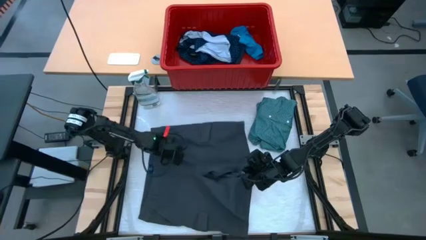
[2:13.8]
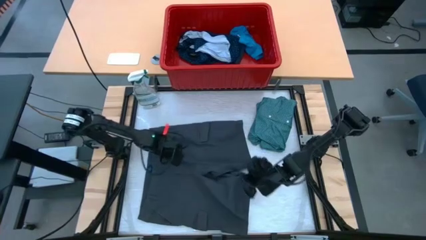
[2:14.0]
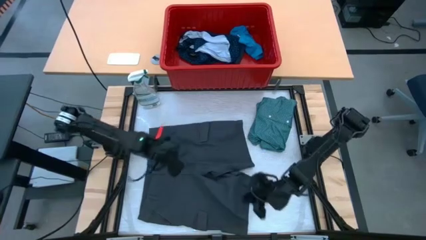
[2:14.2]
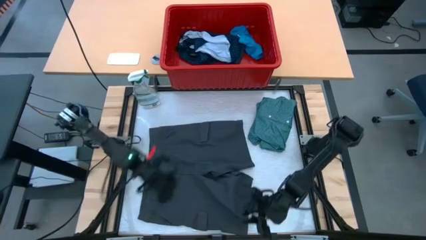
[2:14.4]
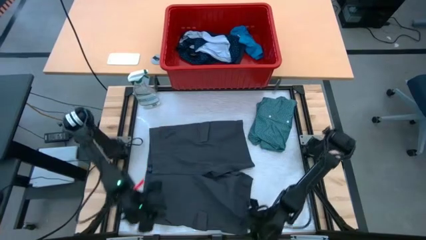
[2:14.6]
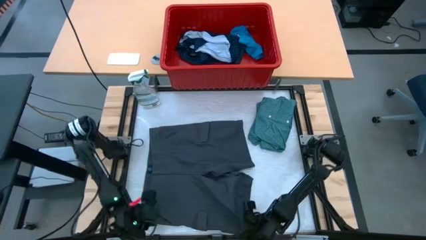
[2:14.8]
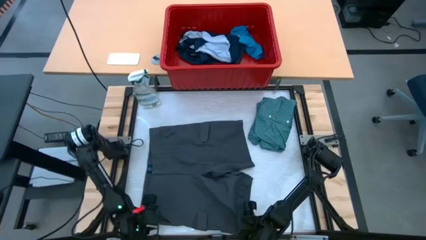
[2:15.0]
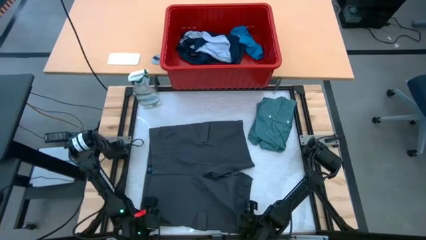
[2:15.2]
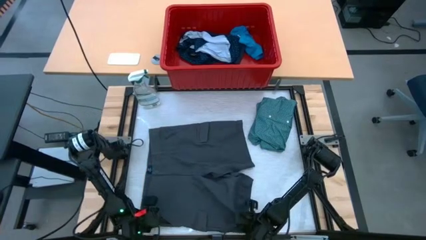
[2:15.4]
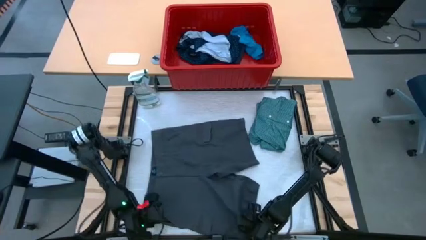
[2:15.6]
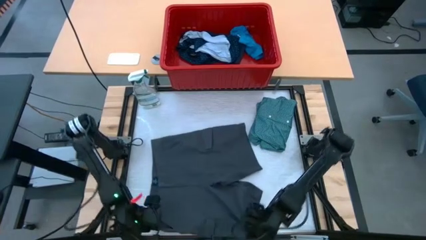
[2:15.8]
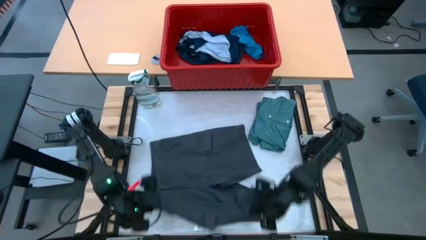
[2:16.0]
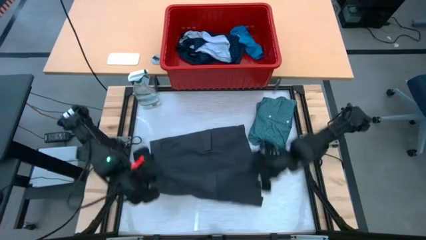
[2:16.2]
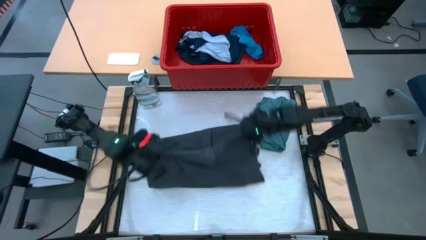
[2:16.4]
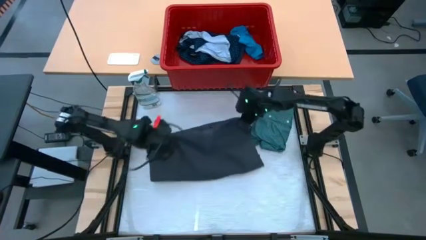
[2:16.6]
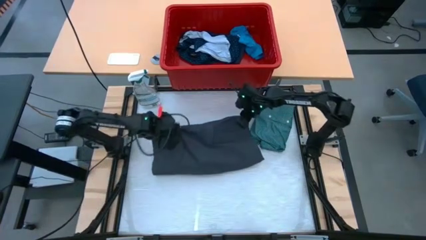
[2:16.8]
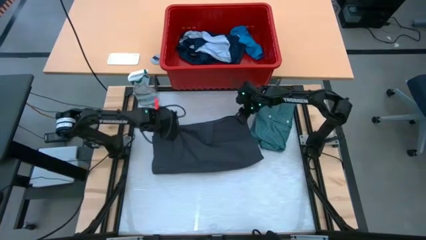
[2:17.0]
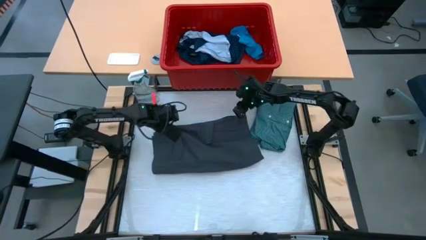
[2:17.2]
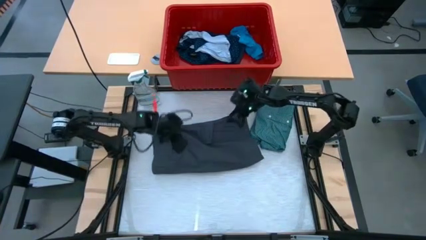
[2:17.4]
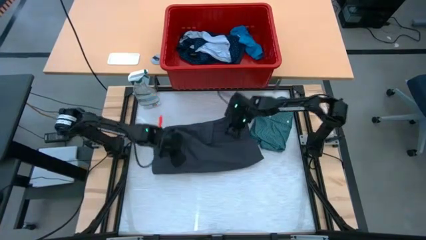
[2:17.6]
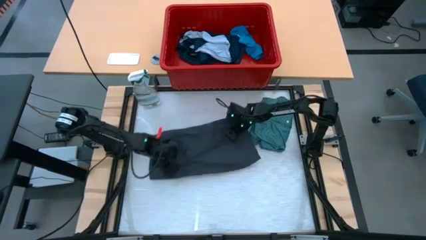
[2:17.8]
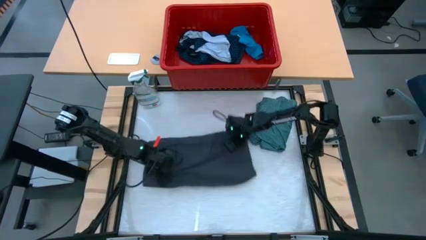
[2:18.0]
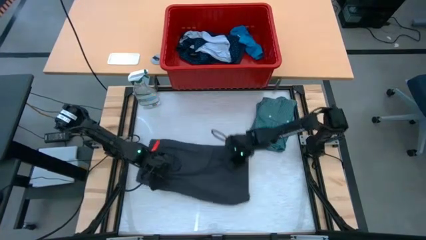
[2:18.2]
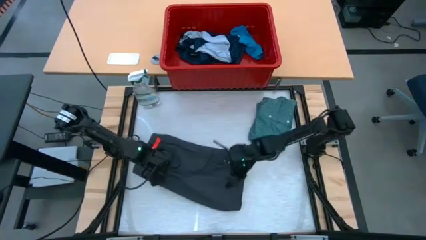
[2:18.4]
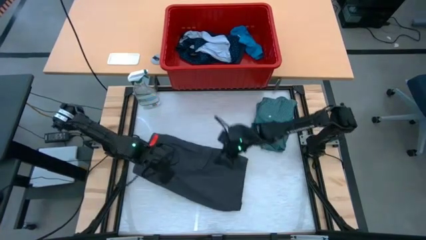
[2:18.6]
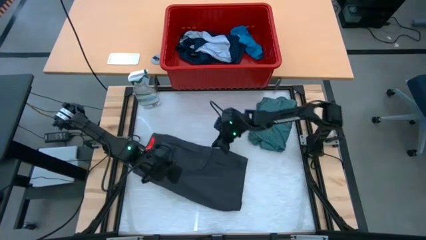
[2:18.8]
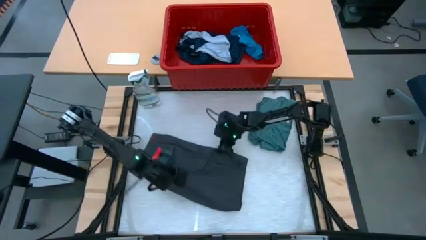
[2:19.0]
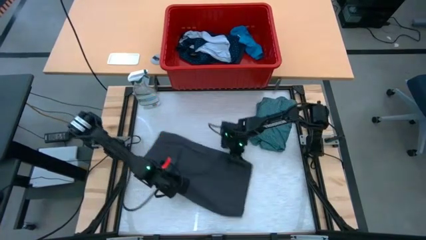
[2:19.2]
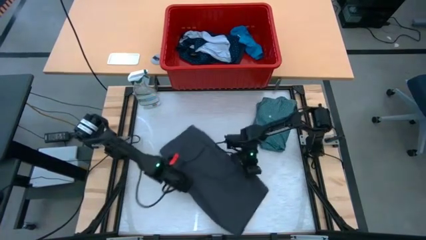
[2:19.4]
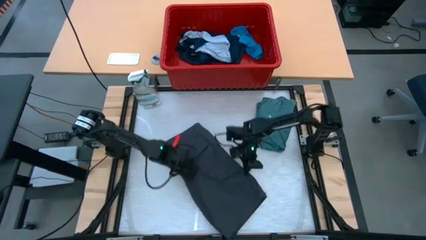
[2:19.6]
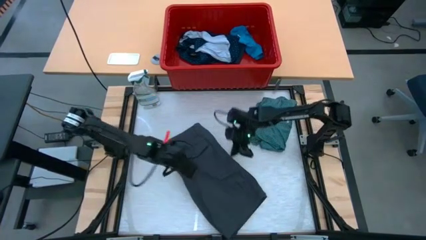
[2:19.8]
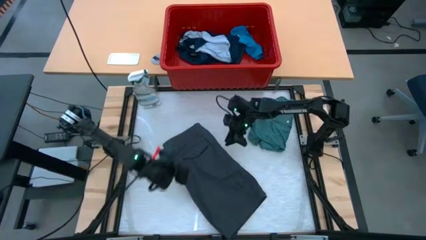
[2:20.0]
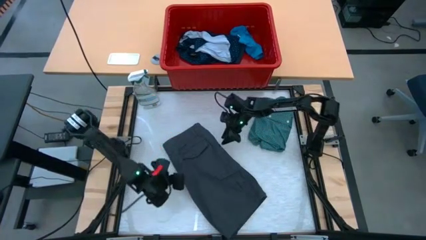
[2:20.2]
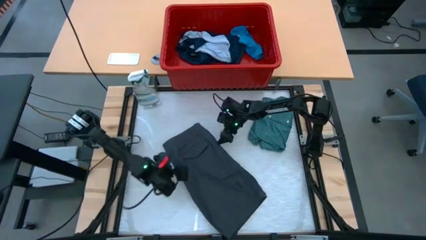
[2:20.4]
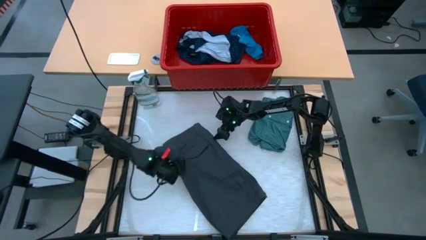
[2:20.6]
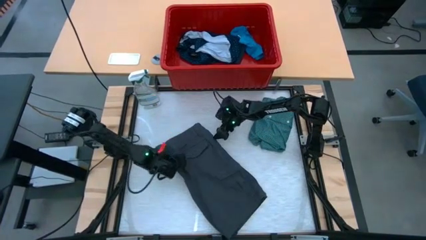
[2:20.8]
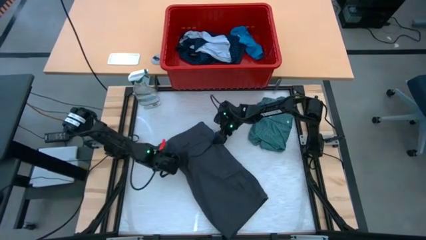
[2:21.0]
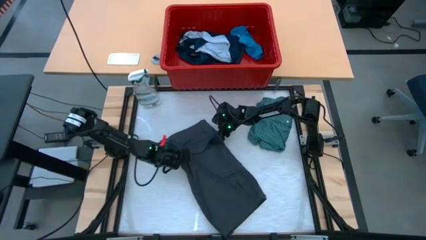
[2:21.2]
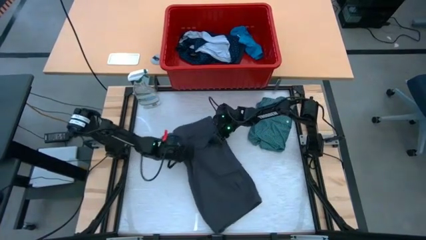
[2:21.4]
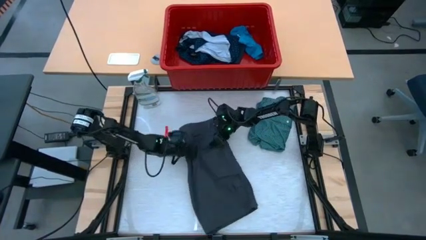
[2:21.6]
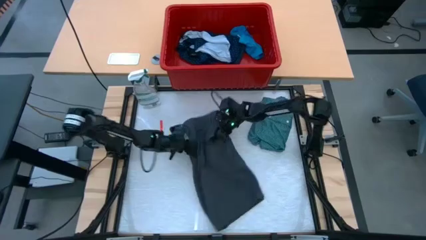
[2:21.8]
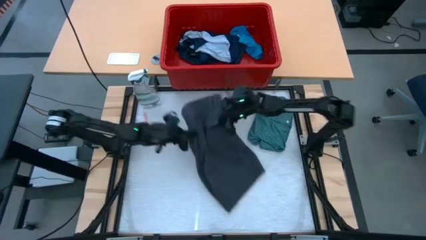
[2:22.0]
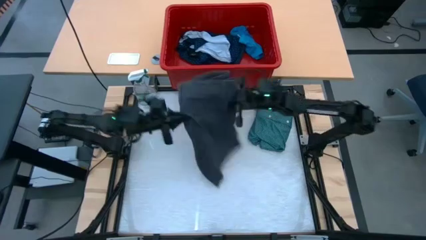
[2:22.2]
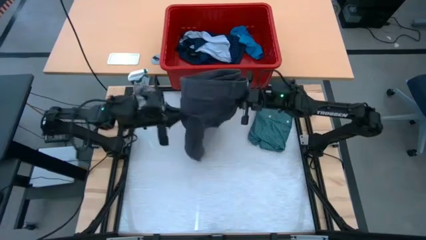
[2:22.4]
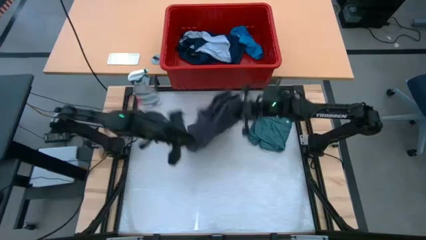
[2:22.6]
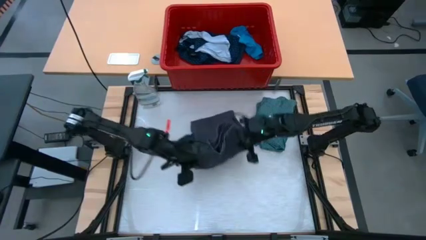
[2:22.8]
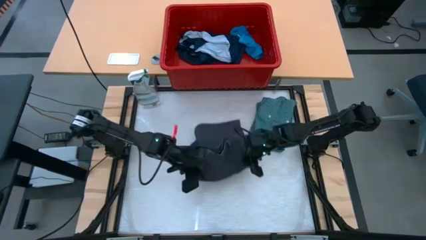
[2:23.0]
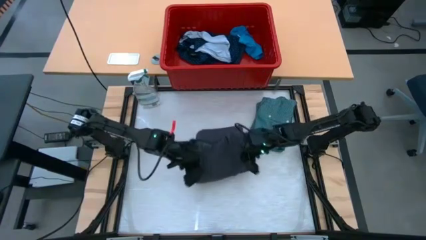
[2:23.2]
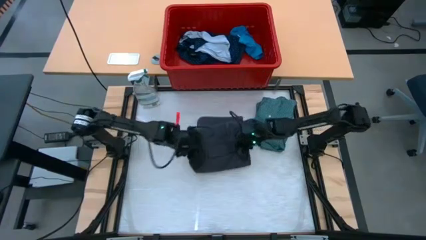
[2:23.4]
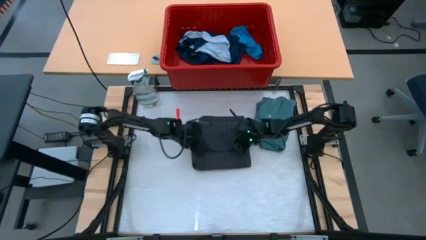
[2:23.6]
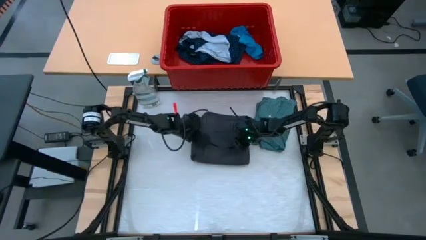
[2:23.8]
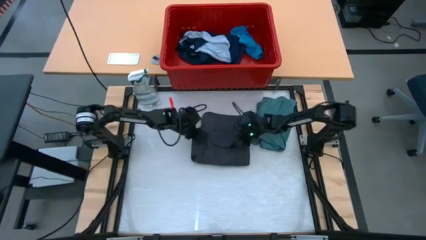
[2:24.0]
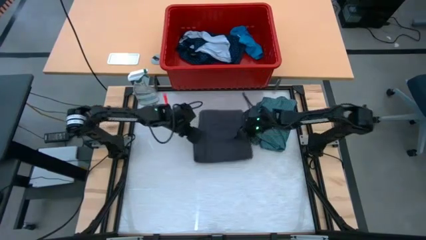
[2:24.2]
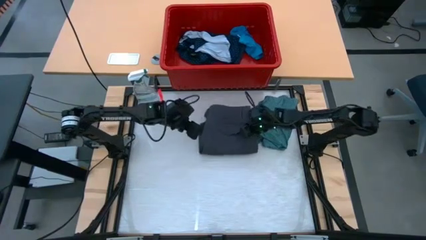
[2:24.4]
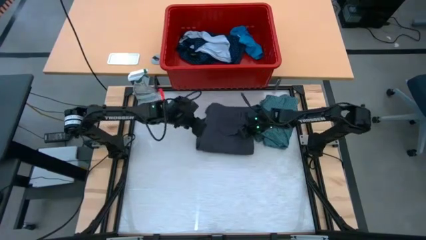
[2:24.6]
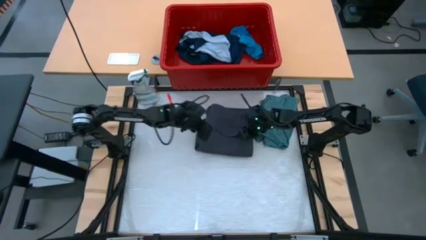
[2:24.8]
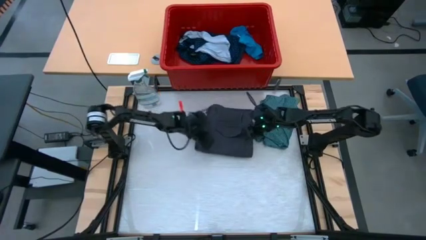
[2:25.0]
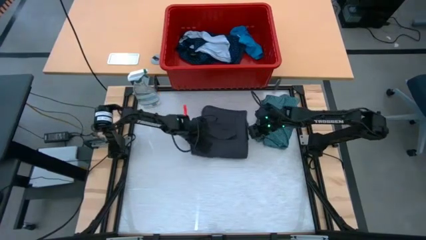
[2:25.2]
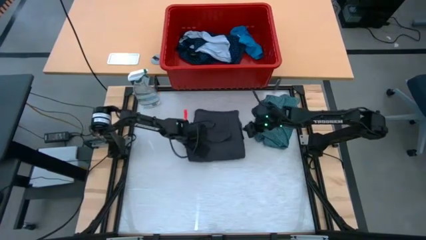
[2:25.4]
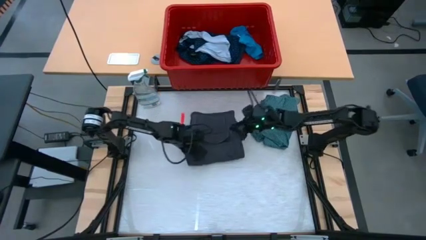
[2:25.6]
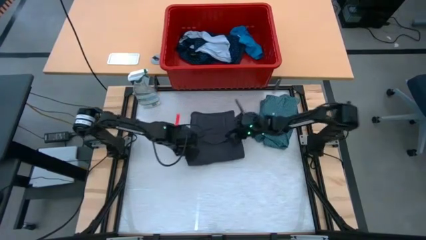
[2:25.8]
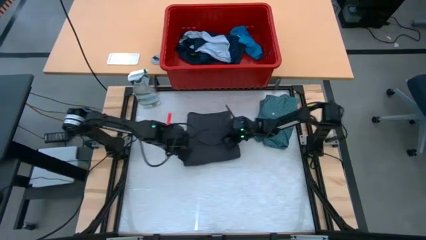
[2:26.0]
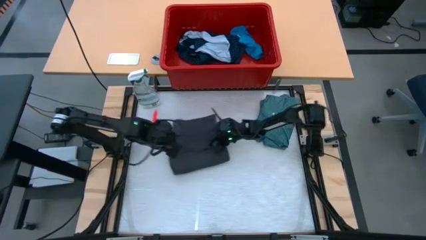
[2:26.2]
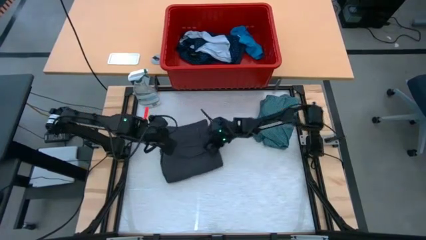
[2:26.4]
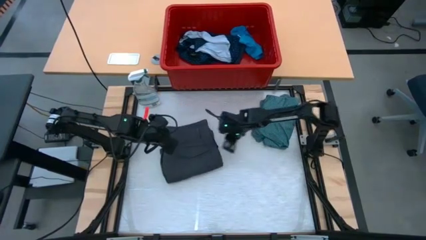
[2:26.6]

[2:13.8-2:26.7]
Task: Fold laundry
Fold the gray shorts

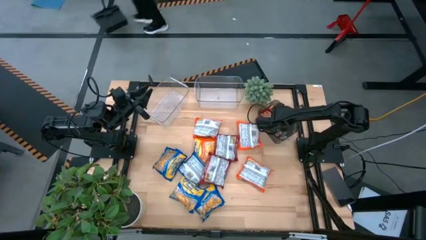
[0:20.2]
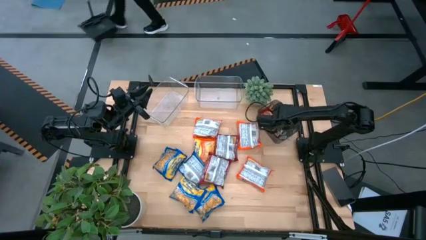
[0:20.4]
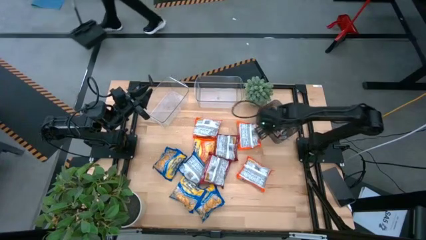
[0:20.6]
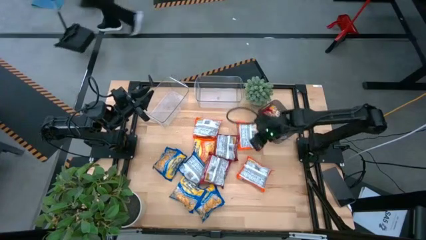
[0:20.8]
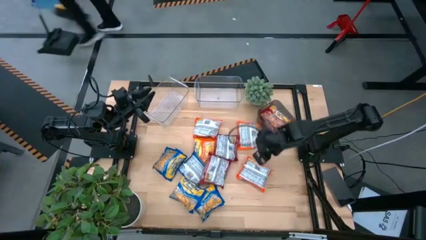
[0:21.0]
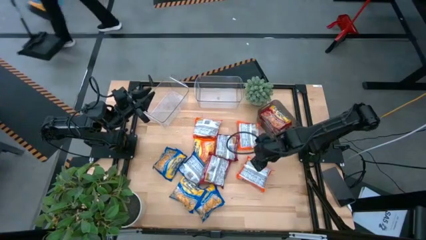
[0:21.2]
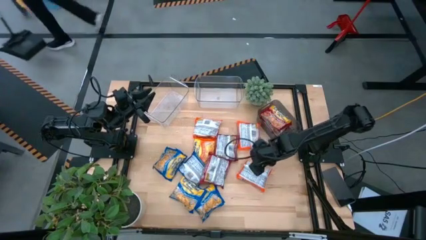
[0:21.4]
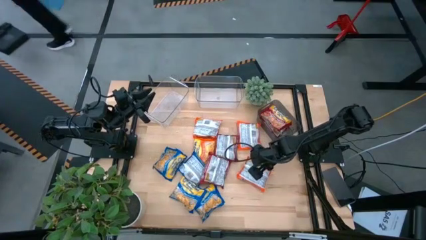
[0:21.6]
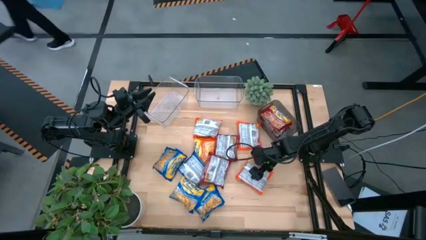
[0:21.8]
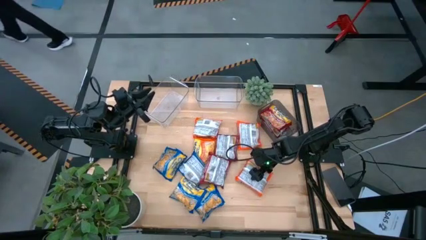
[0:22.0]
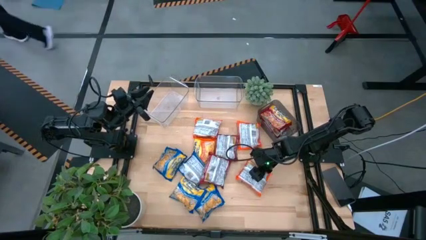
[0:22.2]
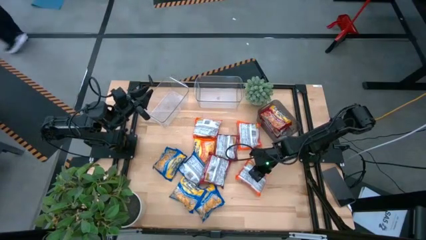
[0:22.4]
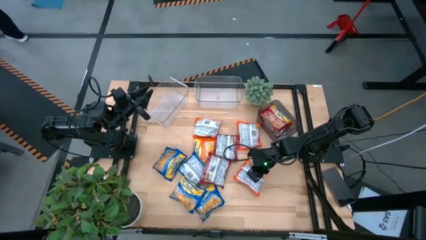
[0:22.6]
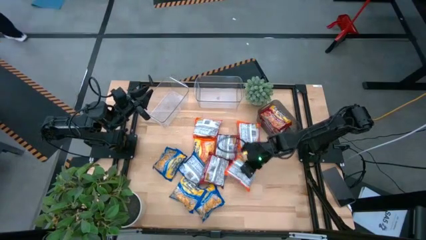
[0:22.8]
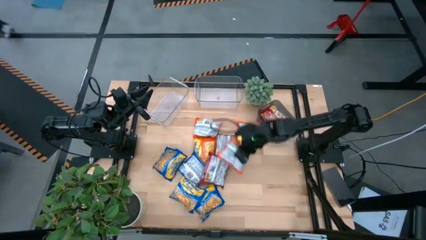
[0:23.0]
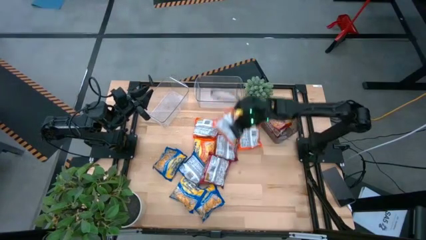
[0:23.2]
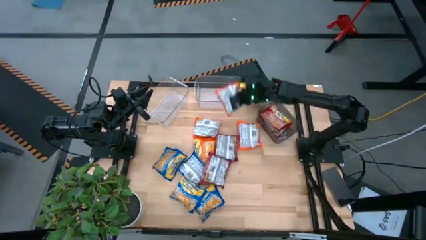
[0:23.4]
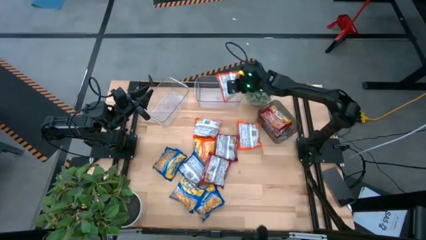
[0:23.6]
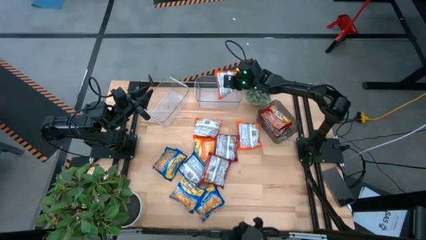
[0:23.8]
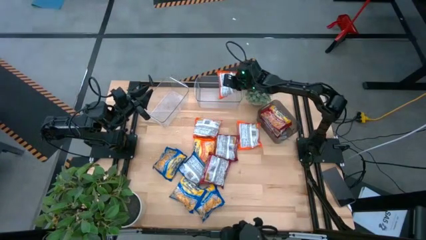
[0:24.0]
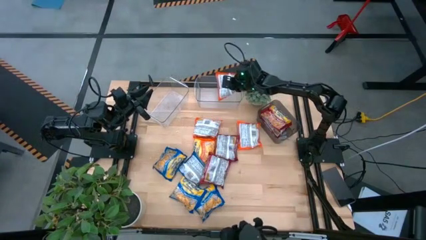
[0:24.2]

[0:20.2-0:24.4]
Task: Sort Maruchan noodles
Put the orange noodle pack into the right transparent bin
